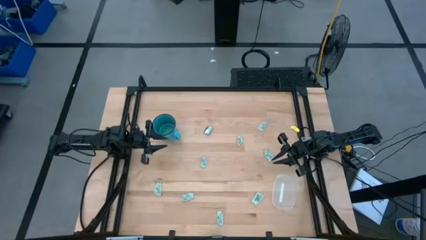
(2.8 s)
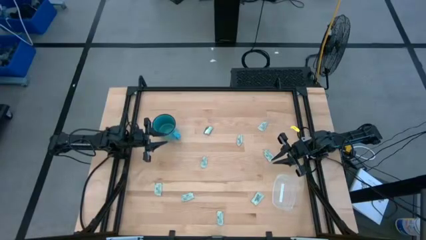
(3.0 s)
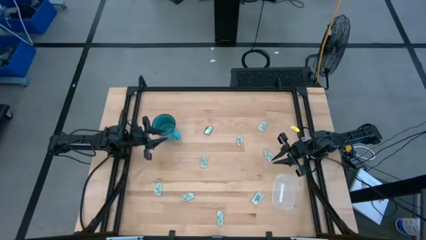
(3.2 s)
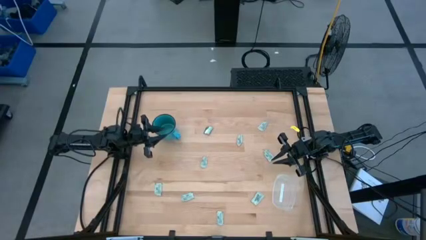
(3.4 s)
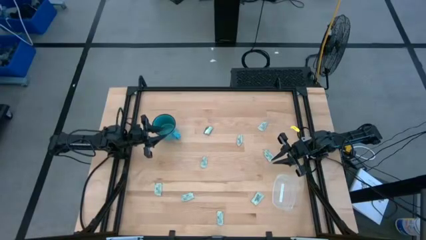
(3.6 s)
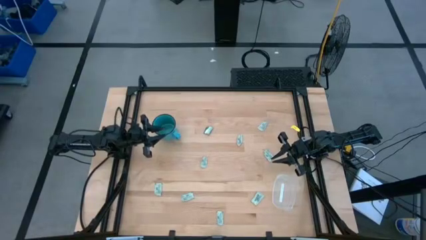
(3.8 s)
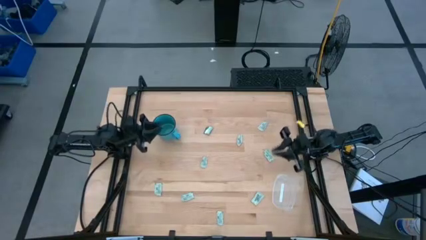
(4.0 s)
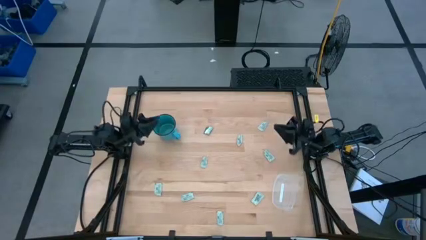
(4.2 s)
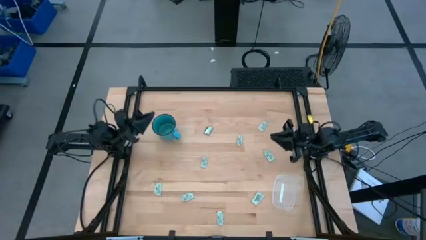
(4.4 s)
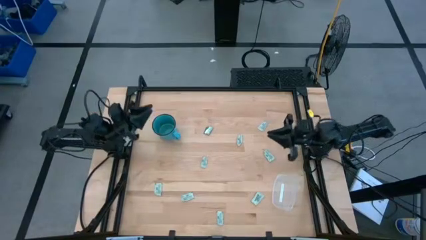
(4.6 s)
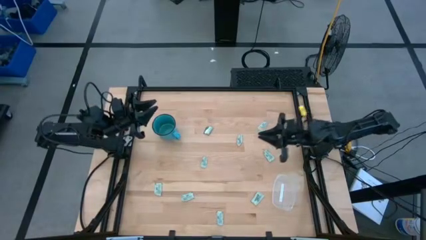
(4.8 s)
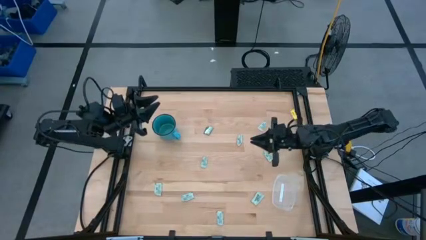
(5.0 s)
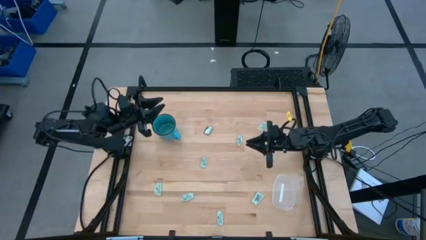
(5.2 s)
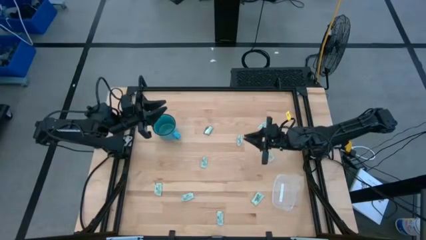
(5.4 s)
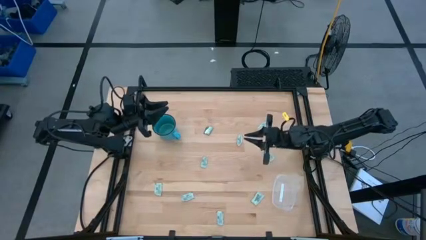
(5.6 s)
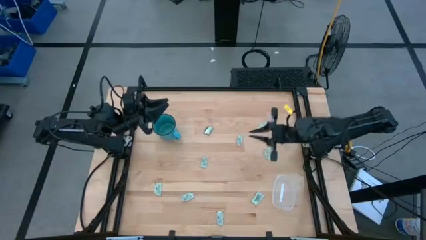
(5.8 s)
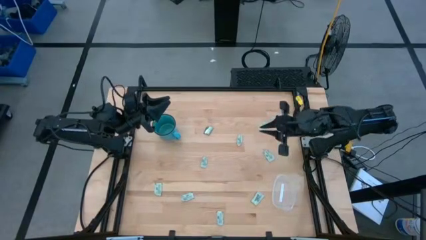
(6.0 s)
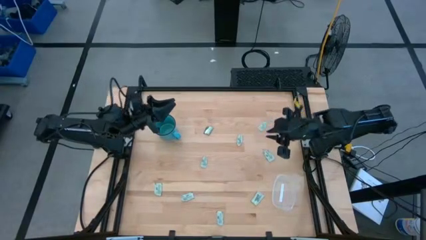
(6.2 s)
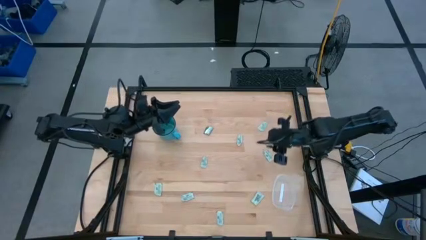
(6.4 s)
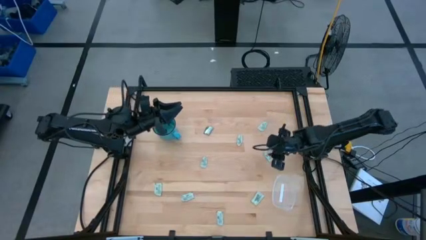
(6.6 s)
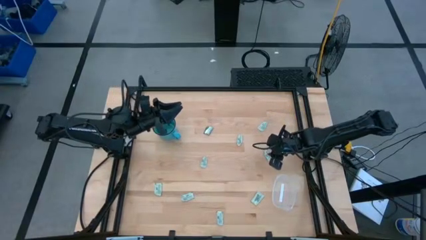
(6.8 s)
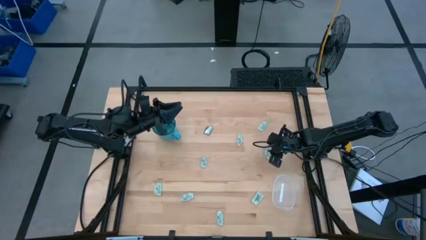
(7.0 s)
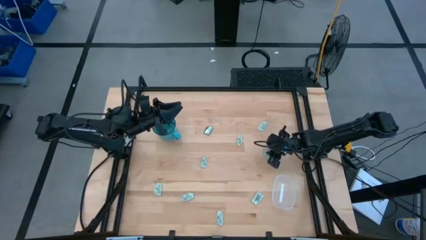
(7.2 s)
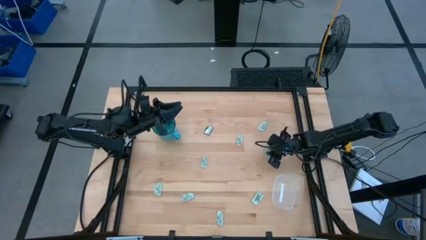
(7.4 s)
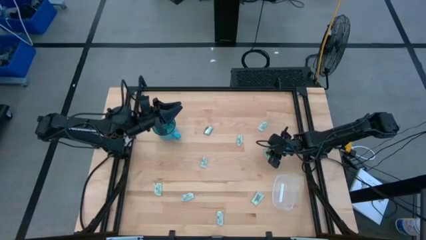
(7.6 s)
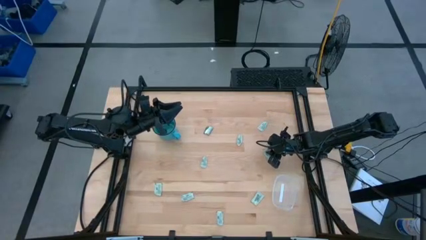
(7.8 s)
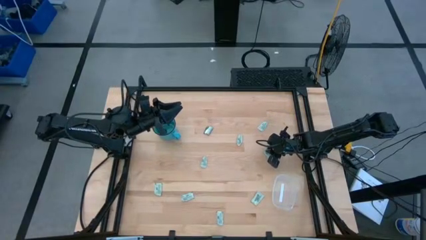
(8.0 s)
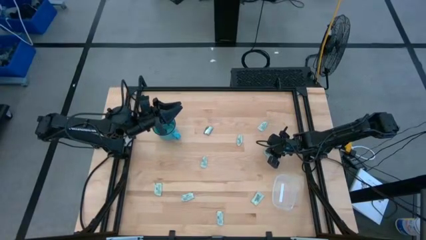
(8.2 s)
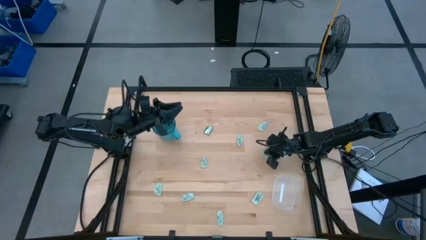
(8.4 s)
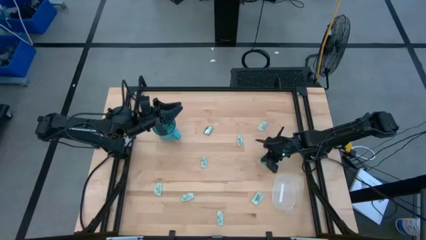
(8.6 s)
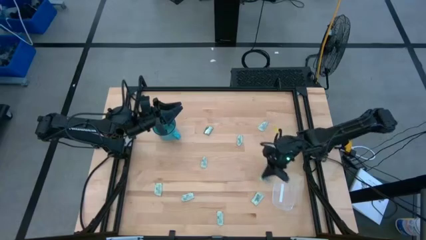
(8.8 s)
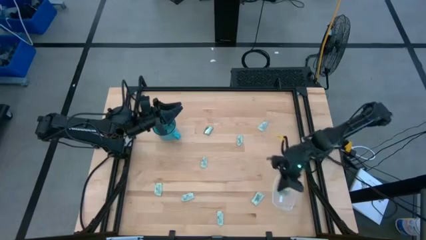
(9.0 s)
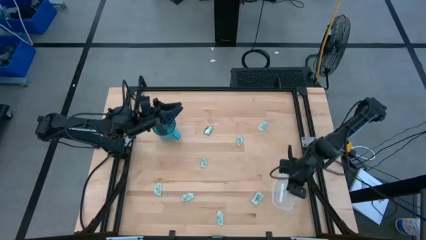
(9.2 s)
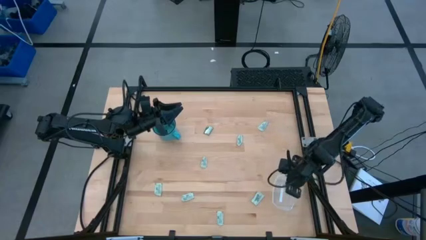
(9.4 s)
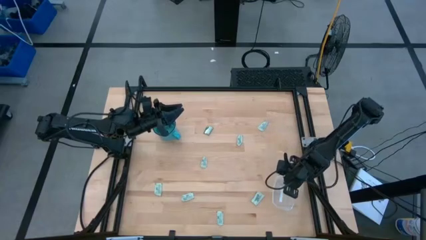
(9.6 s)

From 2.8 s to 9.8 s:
Task: Pick and place Stevia / Truvia into bins
Put the stevia packet into the transparent container

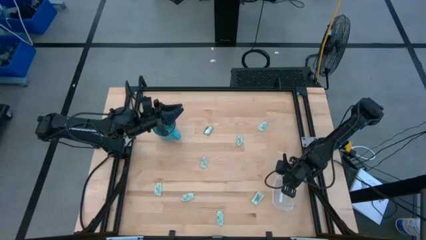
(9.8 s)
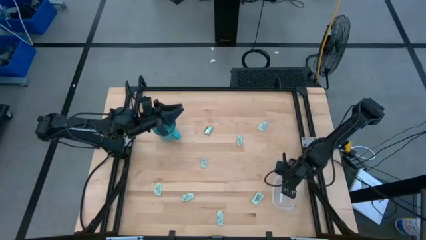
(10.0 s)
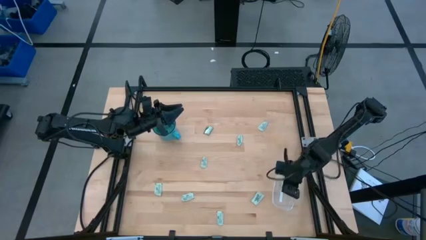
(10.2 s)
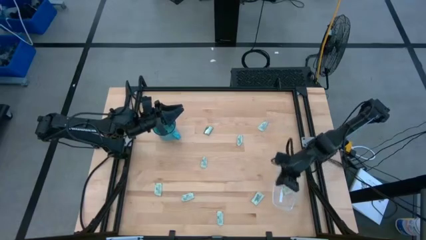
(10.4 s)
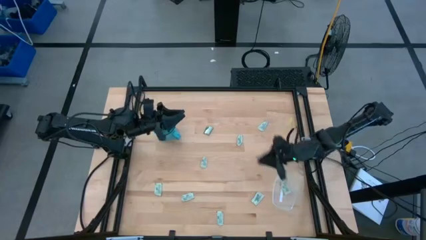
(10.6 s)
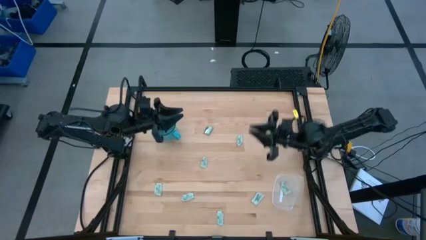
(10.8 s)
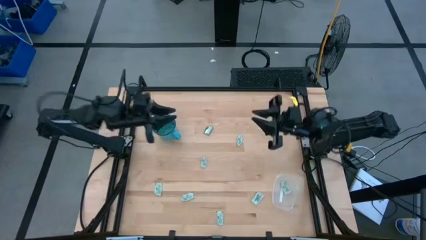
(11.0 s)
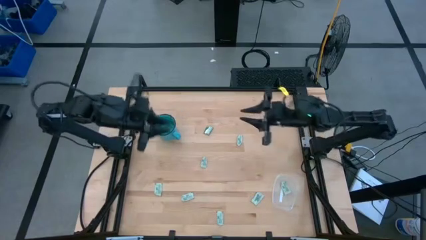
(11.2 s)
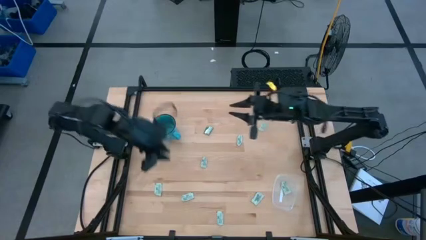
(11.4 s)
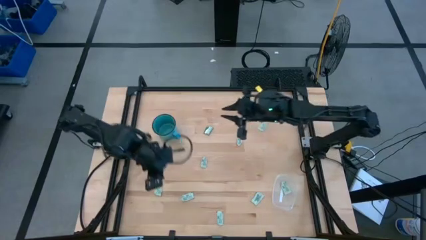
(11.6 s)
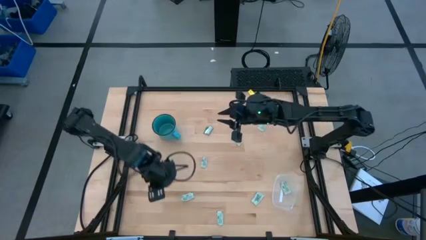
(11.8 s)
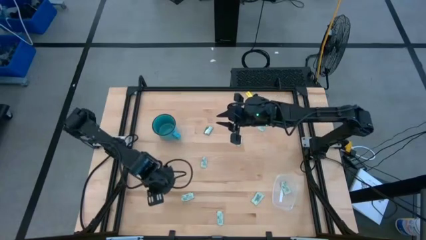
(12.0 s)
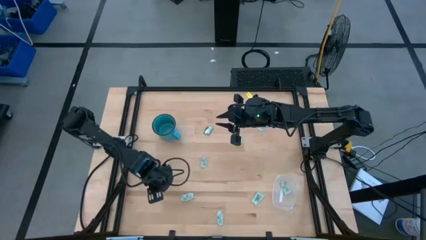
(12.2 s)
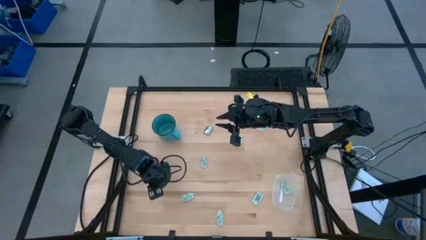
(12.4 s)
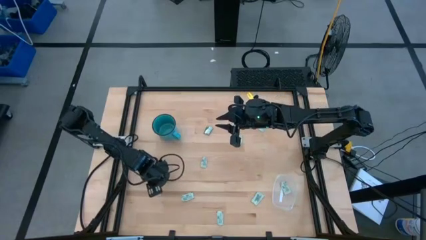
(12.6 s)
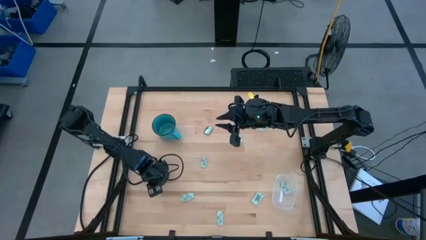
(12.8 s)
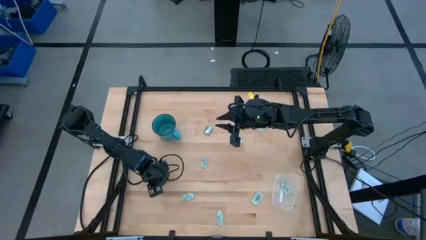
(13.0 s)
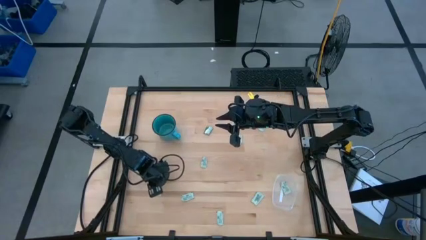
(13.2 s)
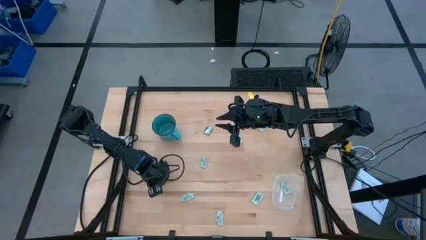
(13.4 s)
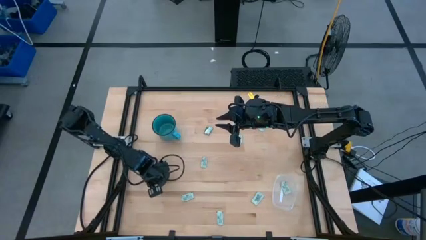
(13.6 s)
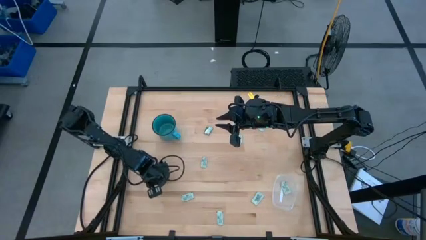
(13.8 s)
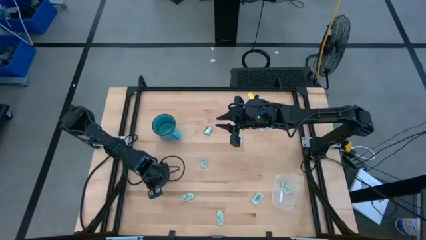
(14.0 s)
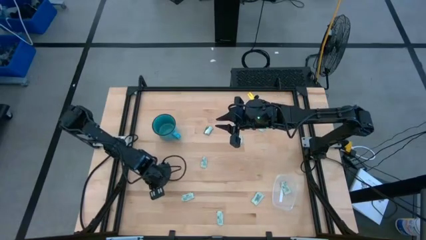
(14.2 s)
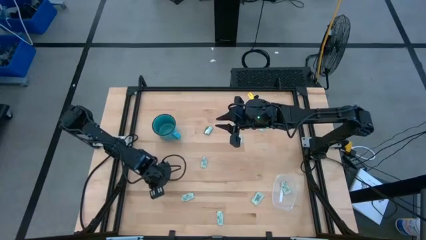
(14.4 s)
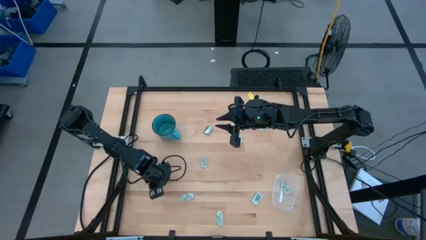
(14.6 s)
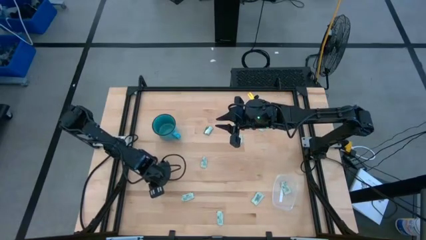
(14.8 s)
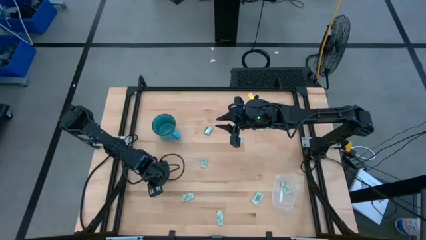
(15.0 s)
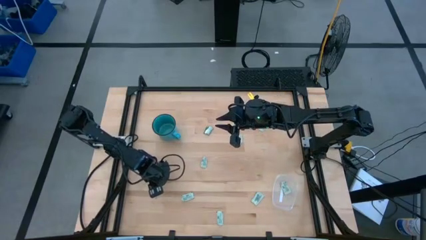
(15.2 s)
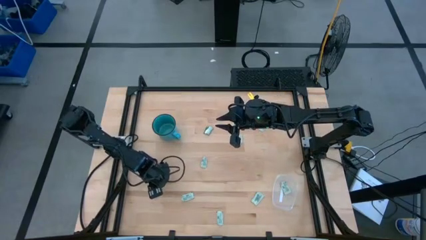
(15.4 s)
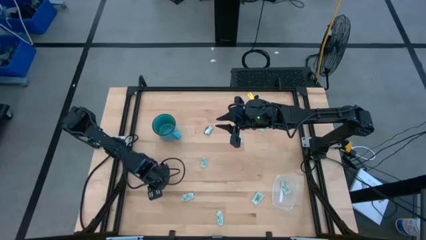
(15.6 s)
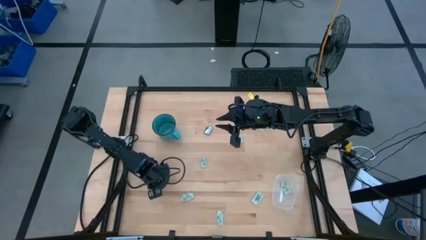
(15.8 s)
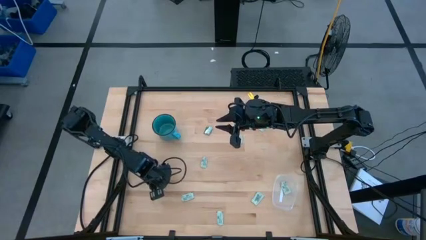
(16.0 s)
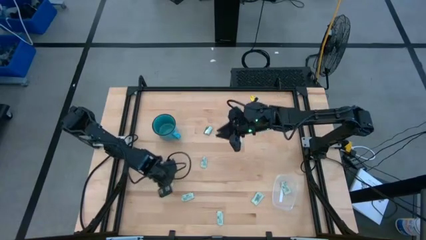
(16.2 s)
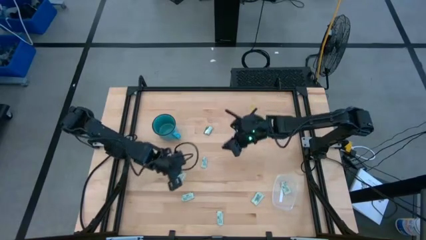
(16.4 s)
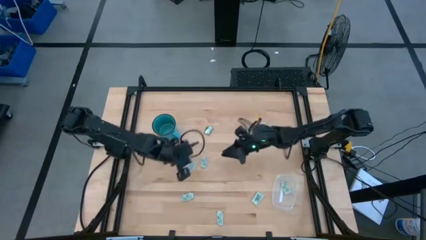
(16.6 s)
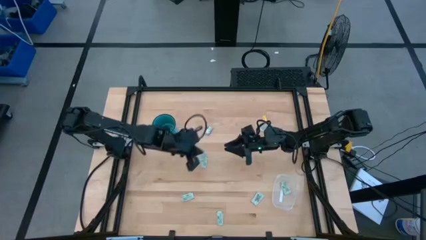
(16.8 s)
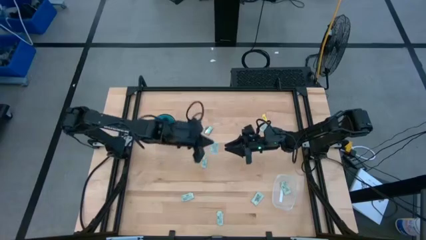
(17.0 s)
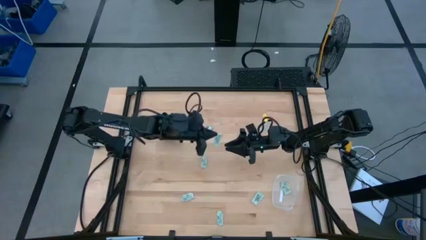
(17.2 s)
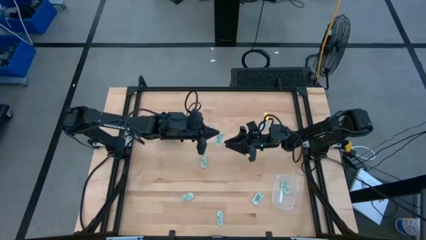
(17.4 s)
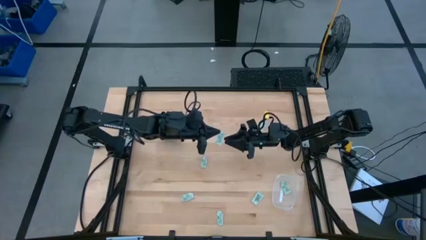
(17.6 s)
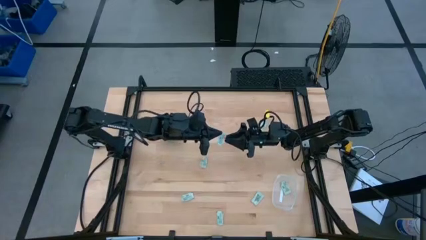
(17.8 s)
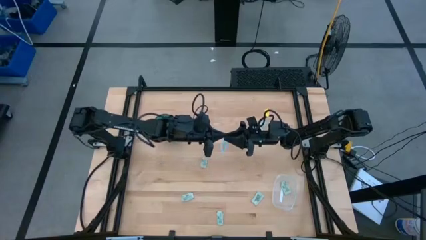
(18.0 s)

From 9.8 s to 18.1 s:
Put the stevia packet into the transparent container

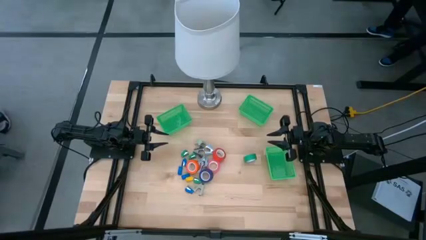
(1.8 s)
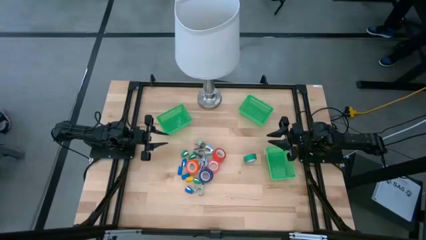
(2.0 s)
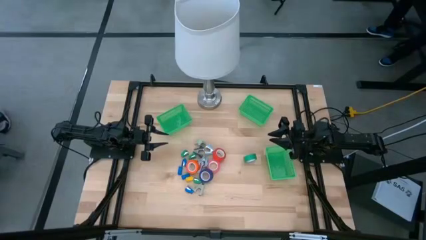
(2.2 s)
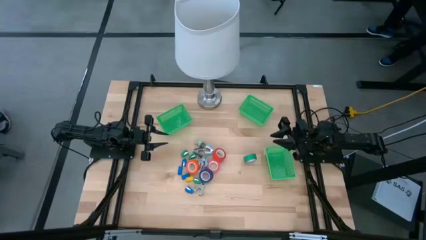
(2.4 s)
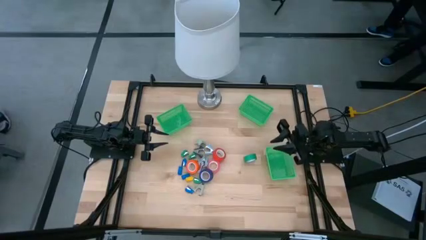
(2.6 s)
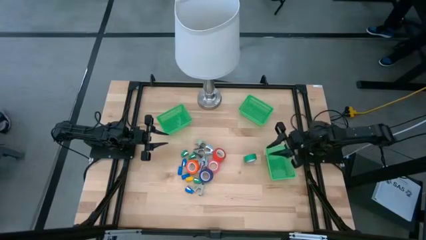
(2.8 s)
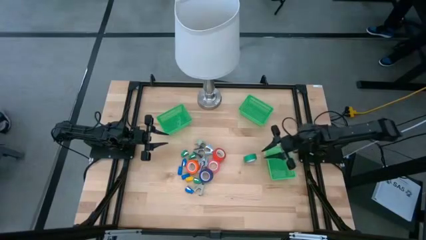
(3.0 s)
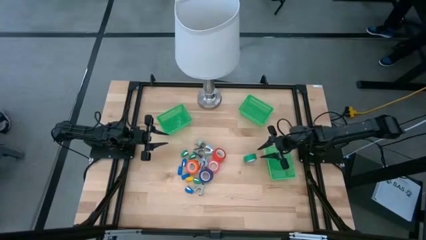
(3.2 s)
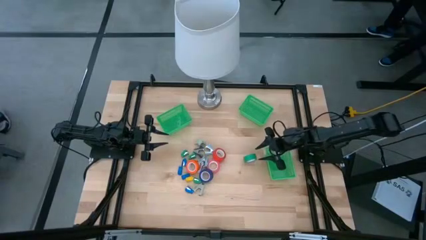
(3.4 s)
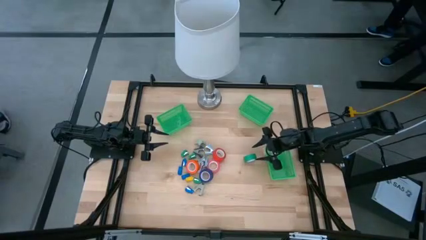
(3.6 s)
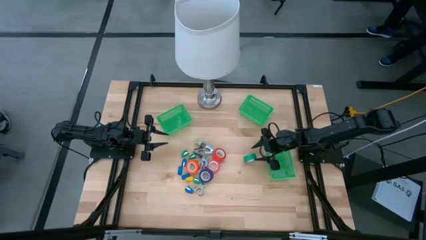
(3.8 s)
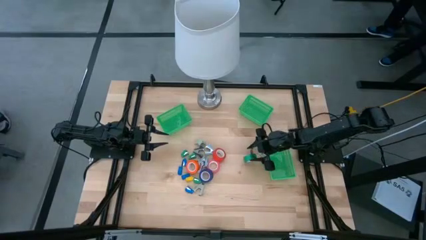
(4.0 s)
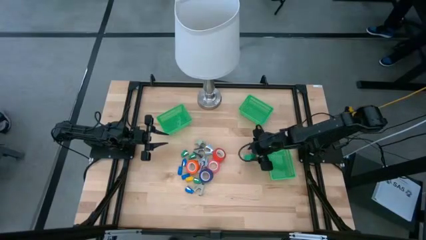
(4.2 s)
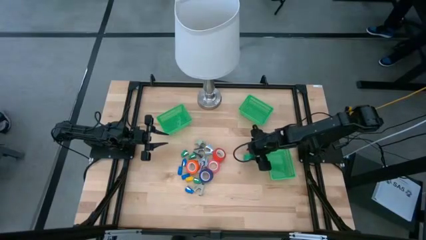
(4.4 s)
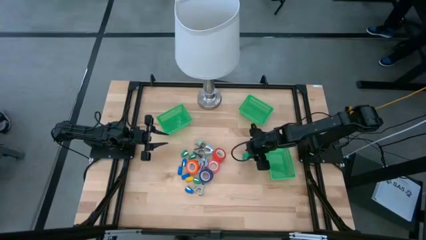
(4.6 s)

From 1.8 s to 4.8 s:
Task: Pick and place Stapler, Stapler remover, tape
Put the green tape into the top right green bin
